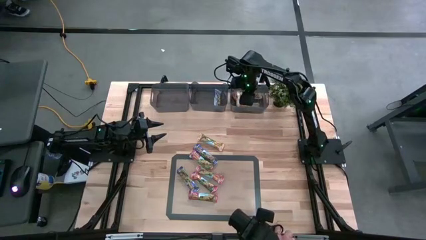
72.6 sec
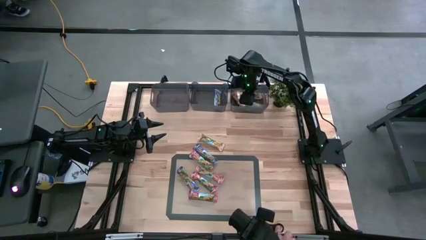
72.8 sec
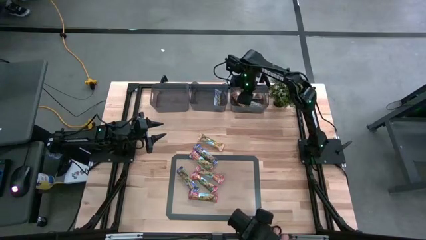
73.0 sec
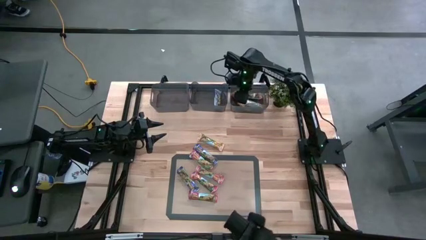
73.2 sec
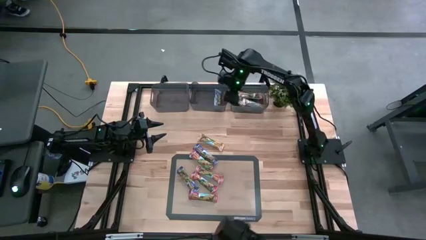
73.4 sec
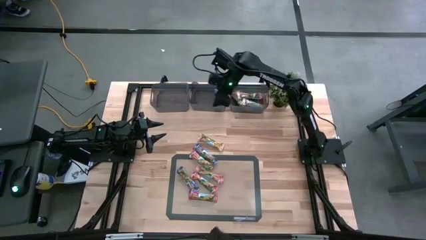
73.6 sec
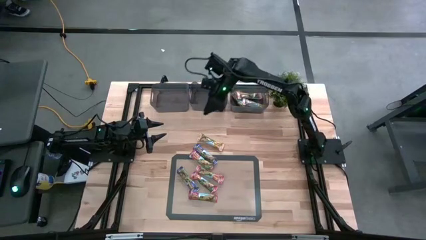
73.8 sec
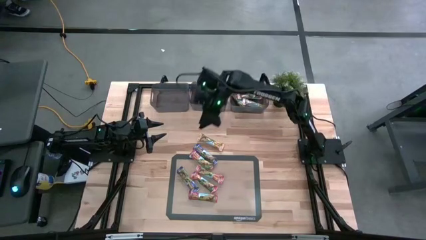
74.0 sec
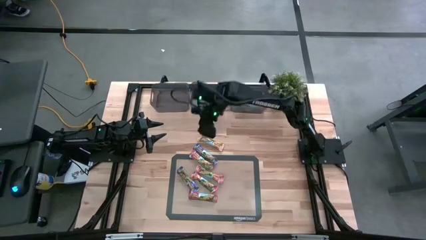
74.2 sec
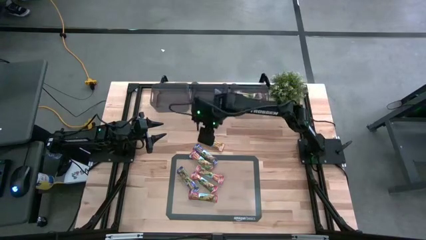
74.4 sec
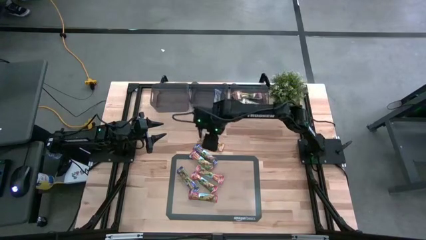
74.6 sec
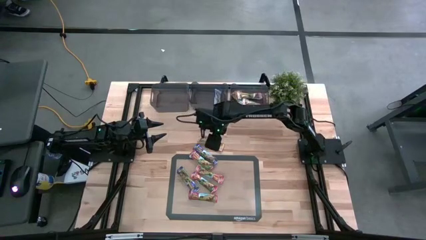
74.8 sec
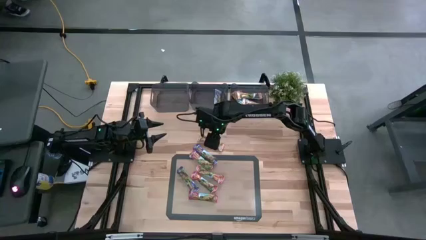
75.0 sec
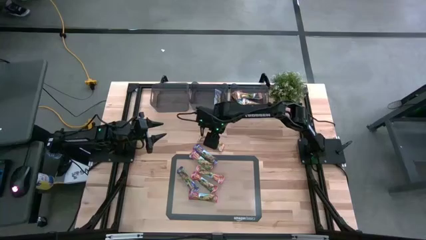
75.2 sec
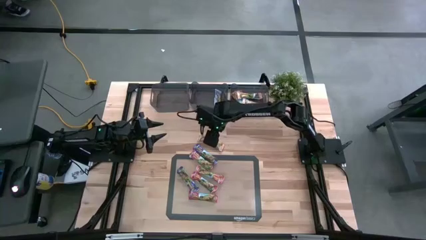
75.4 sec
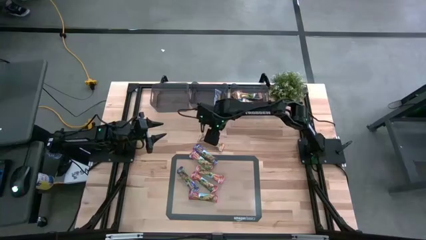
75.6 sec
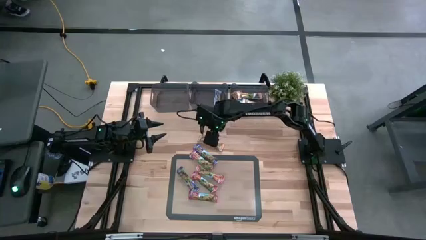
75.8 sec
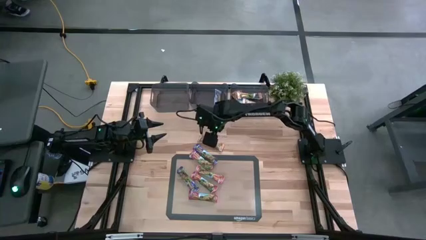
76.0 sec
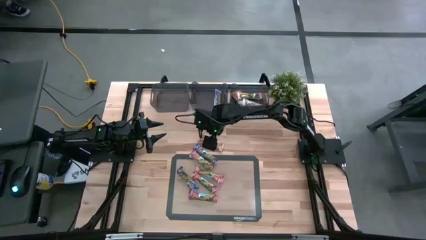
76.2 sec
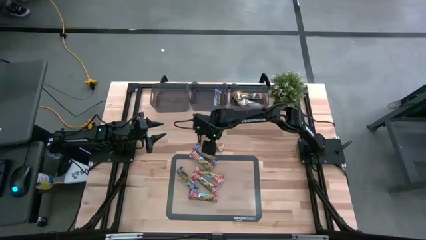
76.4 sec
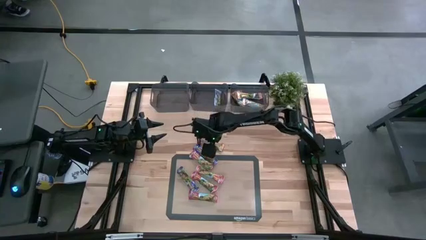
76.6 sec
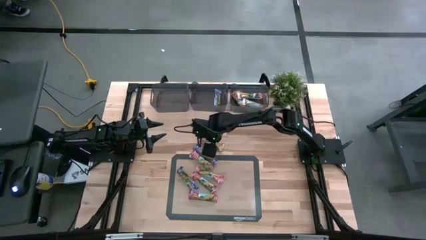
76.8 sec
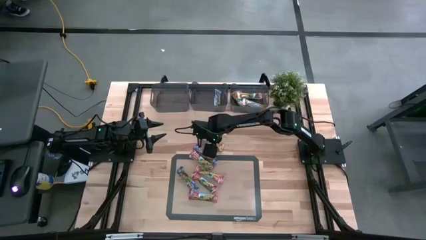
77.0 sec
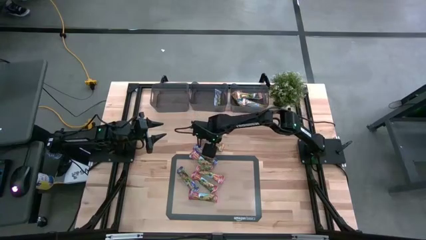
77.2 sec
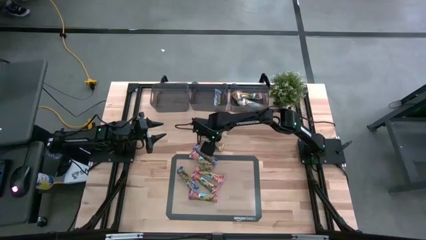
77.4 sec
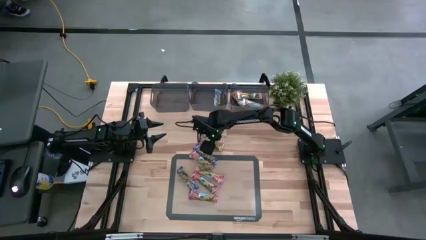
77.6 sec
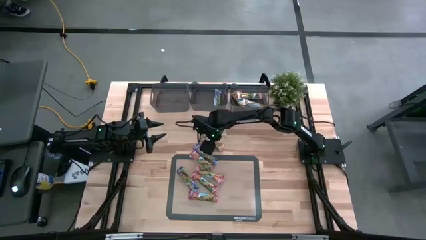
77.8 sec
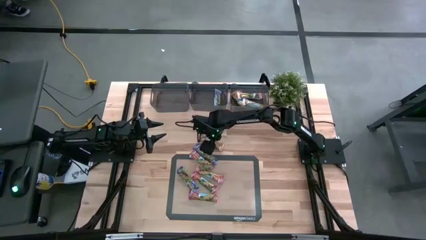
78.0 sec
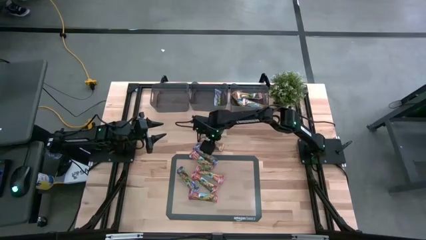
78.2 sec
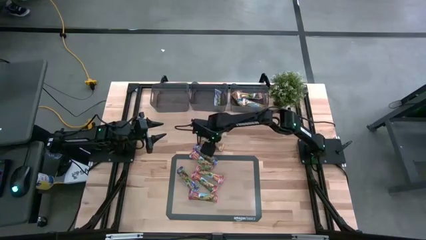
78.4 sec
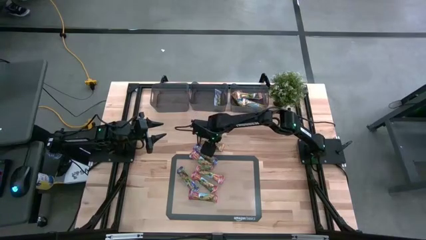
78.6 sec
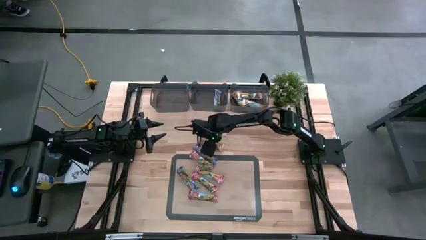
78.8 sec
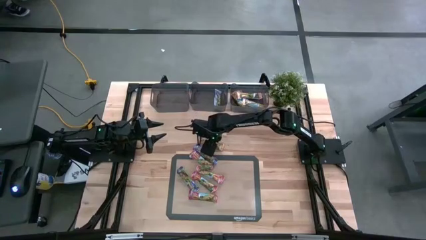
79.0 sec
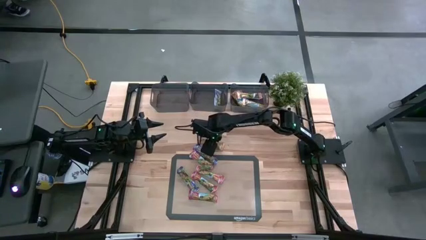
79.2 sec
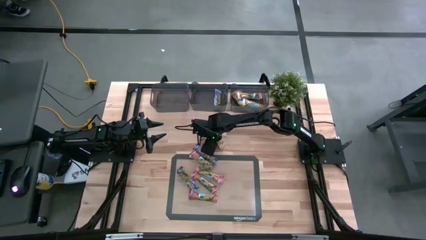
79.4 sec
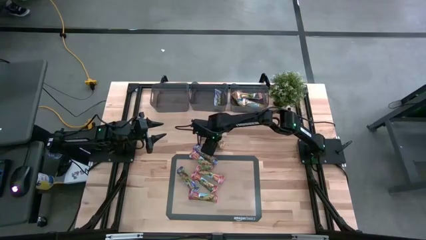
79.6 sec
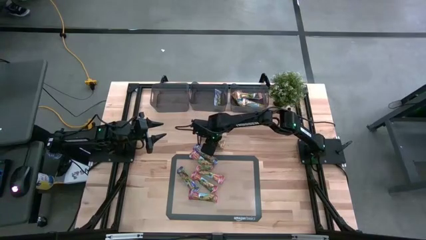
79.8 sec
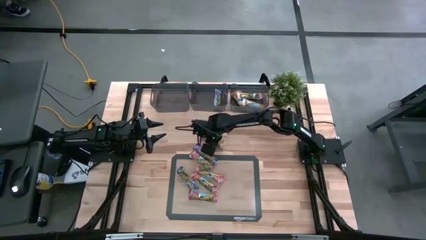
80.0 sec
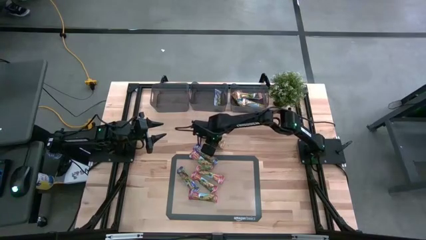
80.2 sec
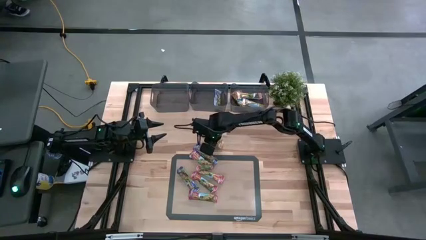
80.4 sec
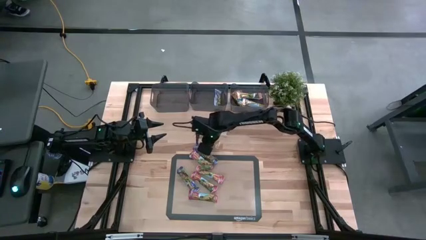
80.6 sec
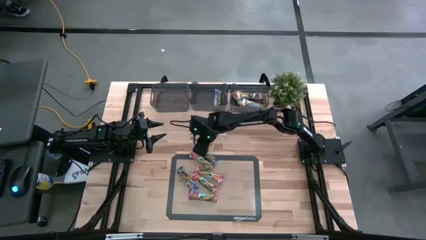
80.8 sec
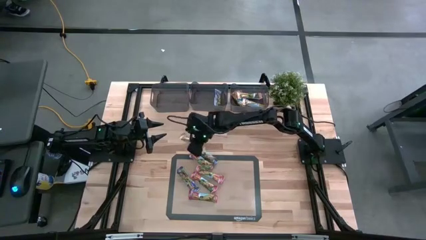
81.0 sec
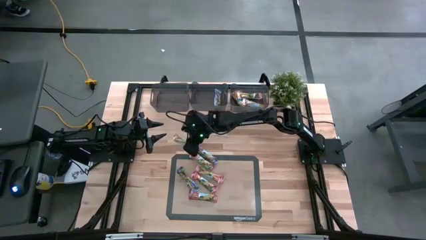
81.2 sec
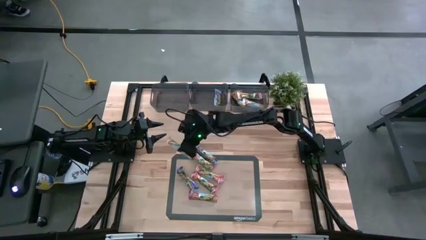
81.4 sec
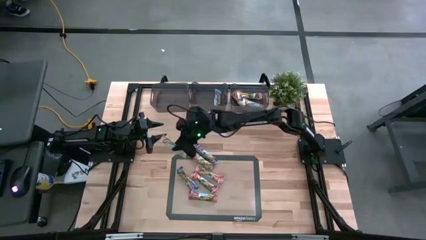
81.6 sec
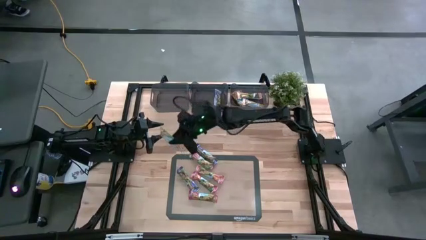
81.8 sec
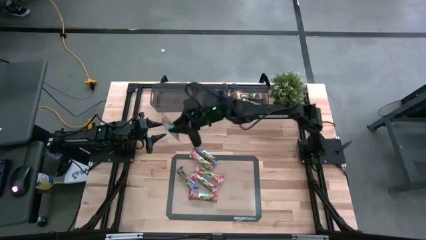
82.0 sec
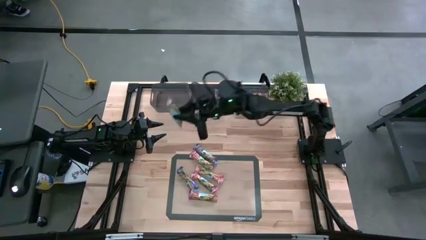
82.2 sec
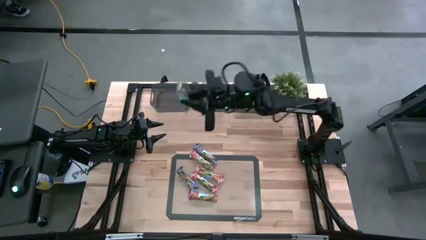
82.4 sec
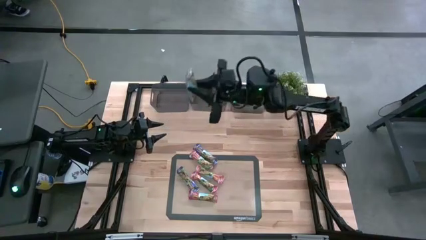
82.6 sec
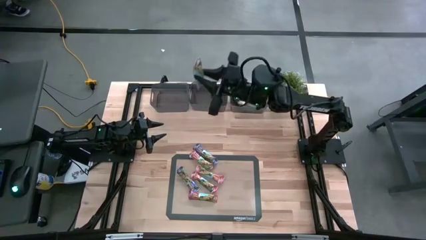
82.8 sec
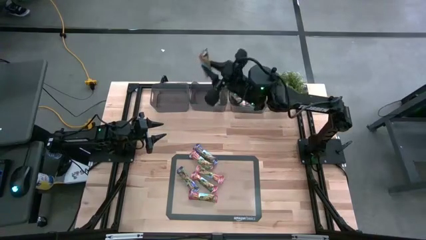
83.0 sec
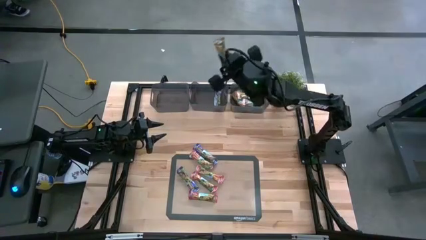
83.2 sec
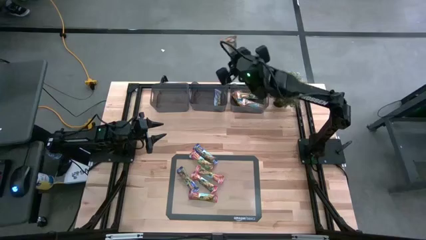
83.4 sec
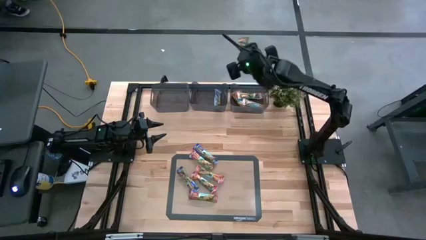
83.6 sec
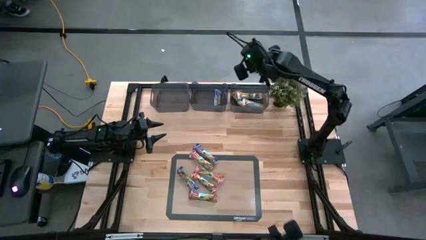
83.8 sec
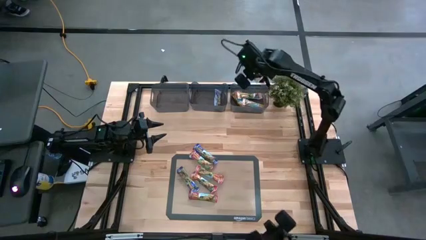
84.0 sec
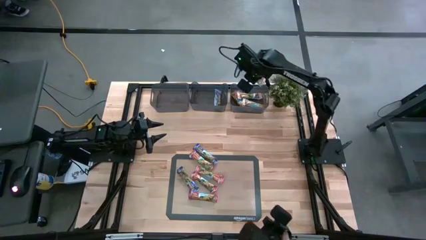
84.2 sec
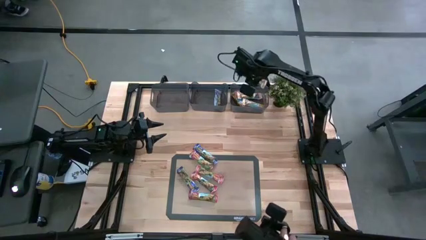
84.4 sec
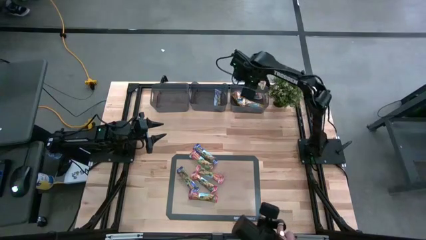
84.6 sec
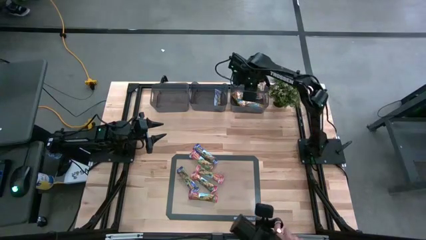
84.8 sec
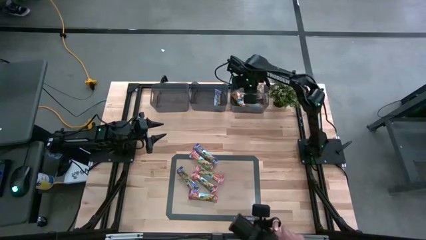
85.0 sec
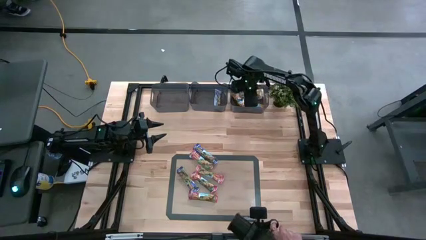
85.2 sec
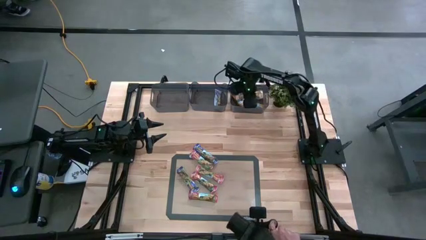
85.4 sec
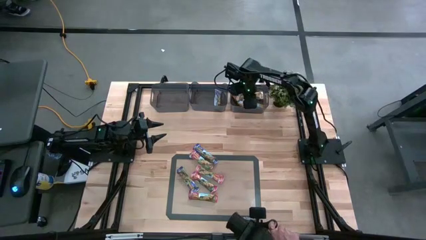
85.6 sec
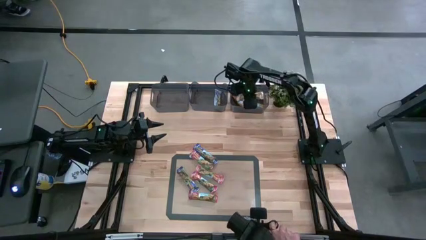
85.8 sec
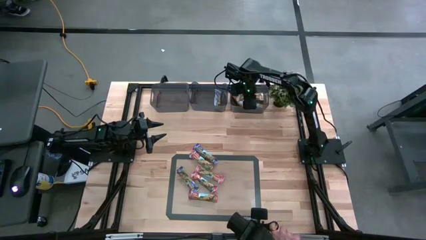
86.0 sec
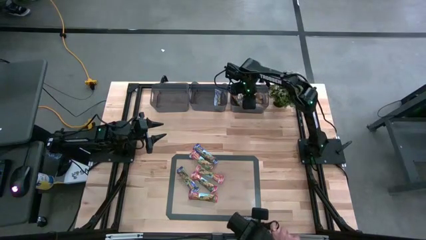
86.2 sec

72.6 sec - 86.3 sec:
Task: Pick and place Granola Bars by type
Put the yellow granola bar into the right black bin

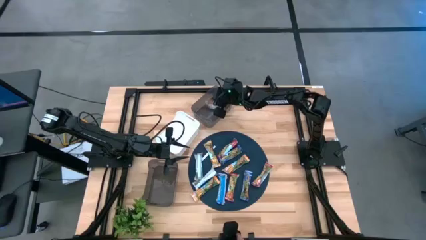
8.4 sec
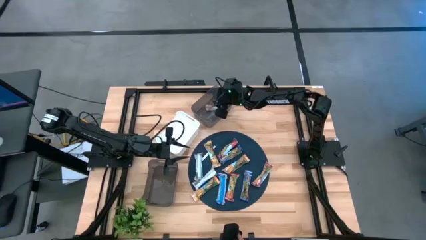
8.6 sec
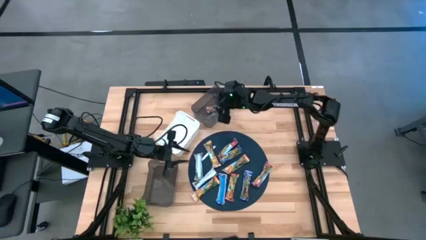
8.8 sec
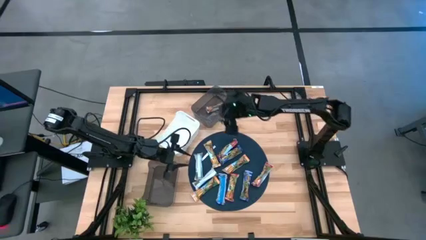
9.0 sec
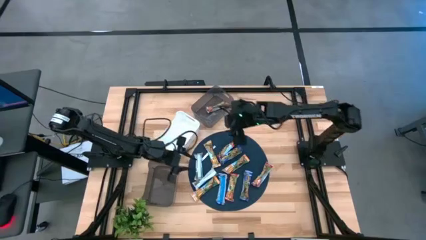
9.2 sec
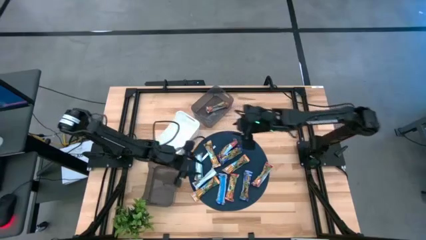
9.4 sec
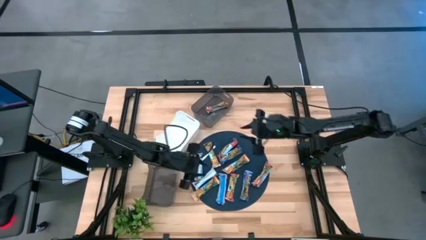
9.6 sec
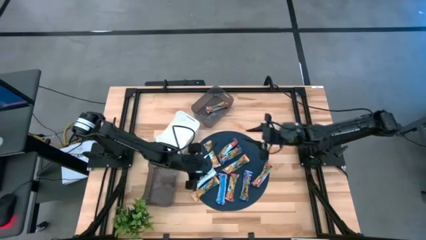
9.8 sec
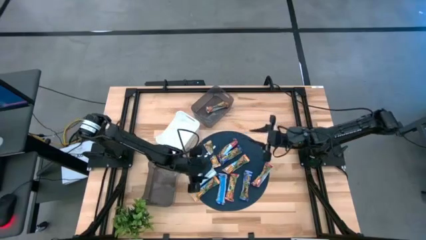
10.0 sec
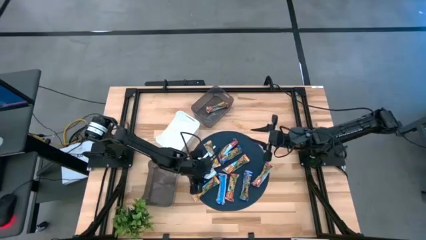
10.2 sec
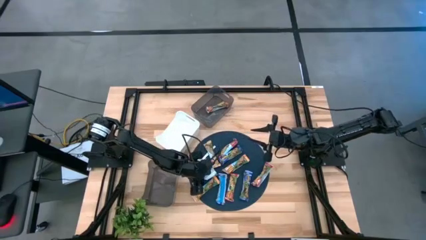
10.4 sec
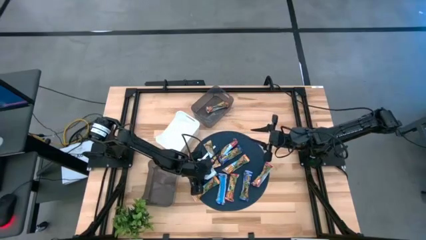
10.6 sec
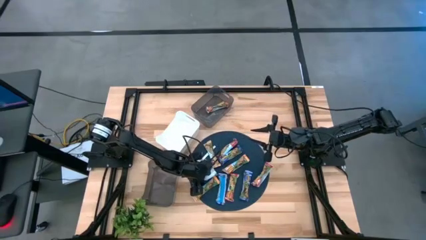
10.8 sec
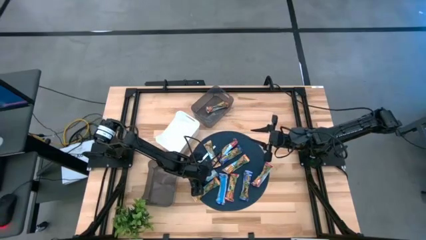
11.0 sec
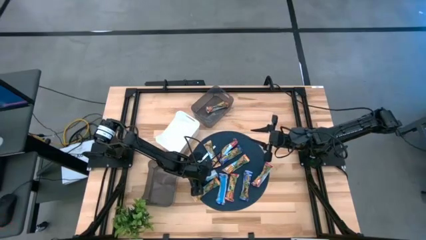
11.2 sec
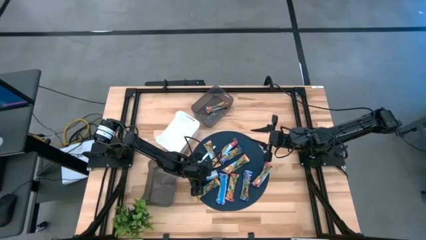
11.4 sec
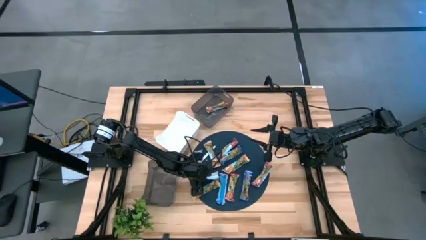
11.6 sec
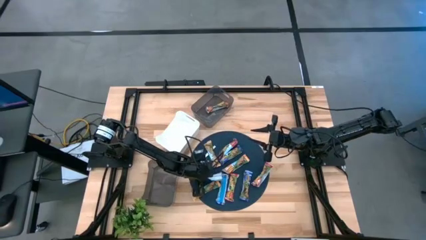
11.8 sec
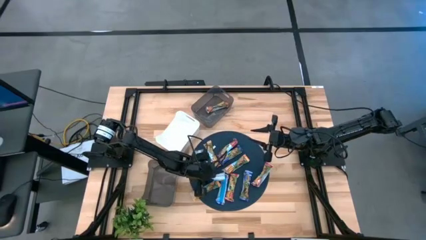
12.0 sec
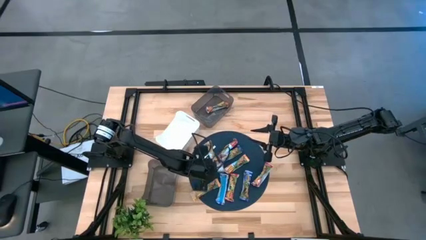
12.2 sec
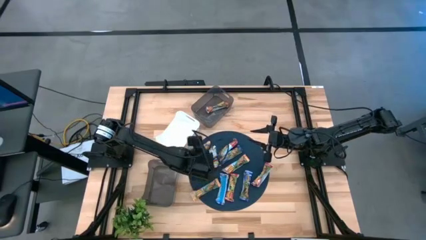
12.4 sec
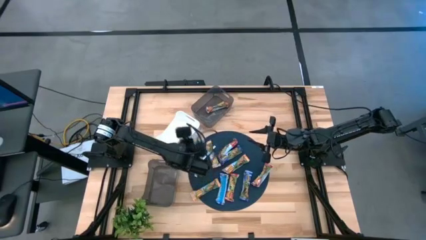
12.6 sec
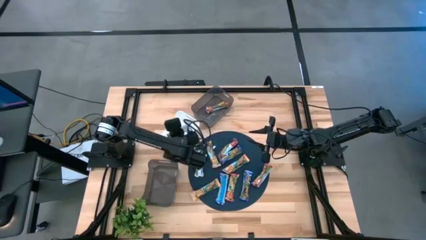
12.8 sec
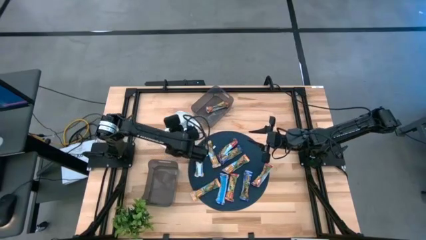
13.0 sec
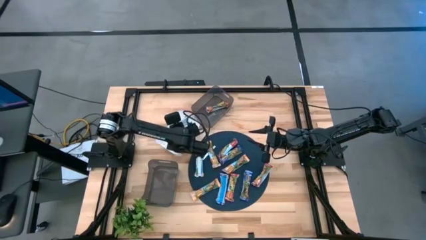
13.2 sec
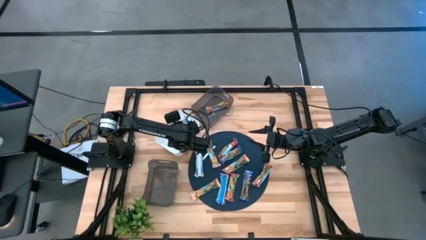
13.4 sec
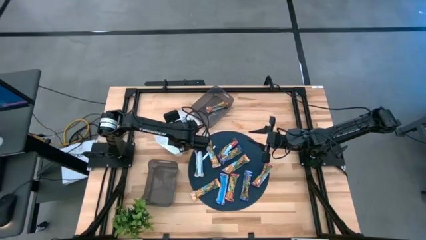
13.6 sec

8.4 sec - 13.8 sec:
Task: Pick and place Granola Bars by type
Put the yellow granola bar into the white bin
